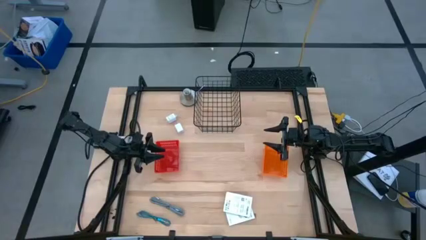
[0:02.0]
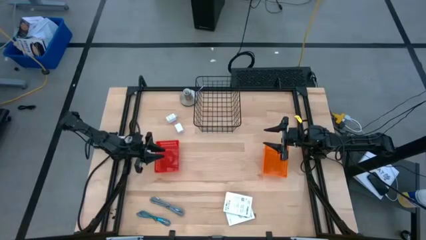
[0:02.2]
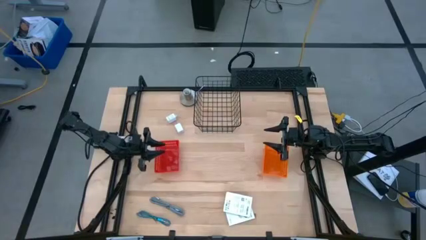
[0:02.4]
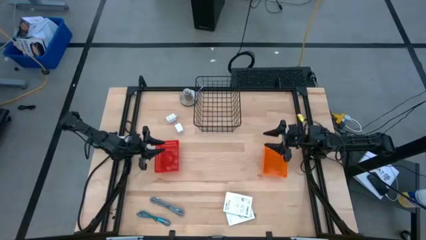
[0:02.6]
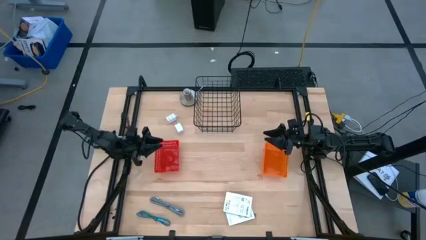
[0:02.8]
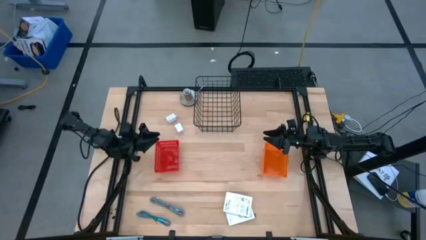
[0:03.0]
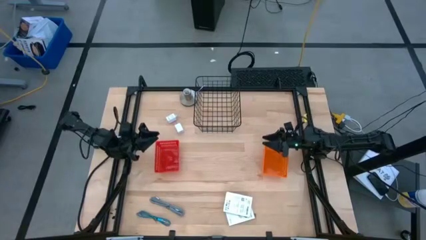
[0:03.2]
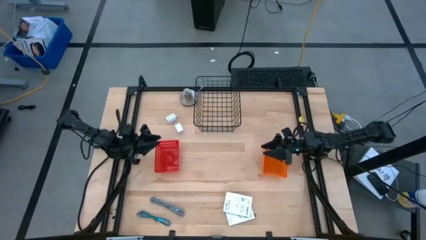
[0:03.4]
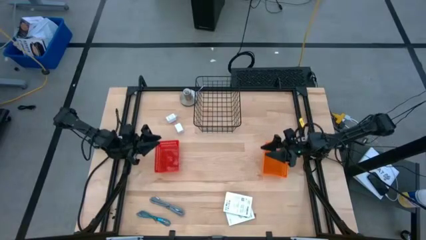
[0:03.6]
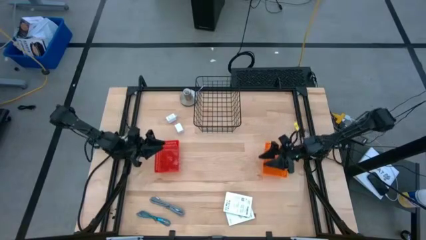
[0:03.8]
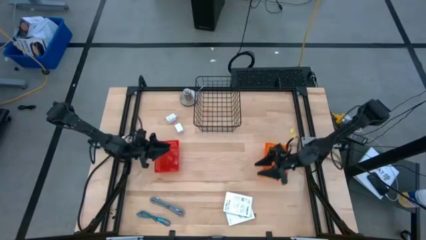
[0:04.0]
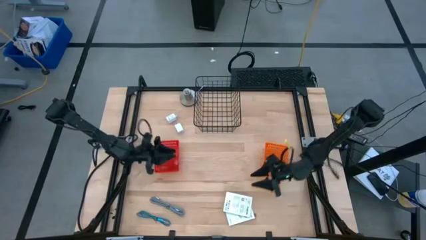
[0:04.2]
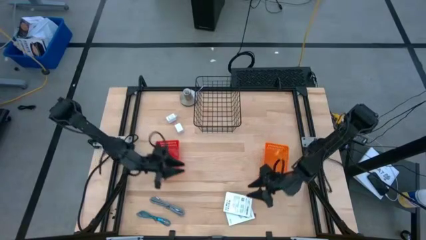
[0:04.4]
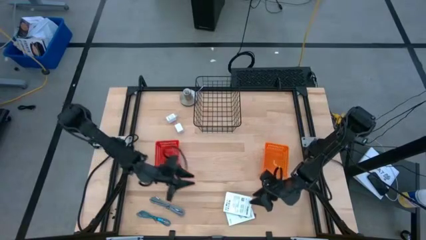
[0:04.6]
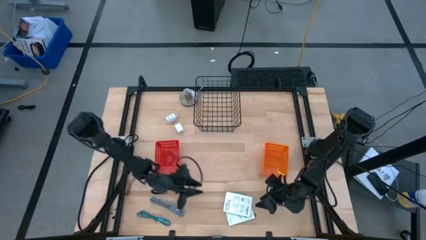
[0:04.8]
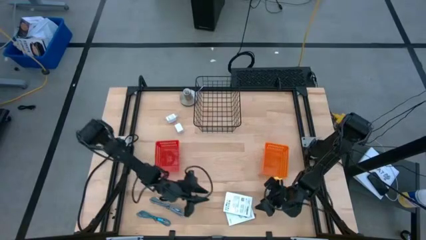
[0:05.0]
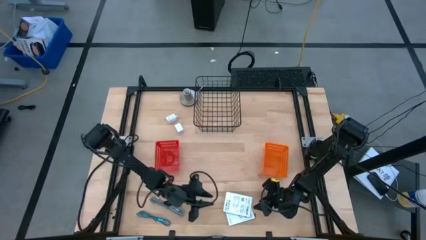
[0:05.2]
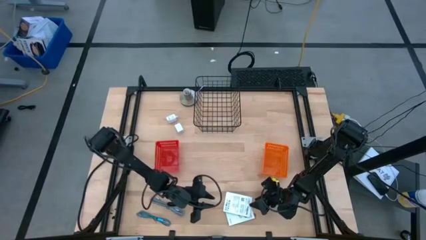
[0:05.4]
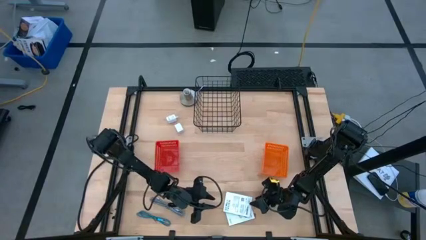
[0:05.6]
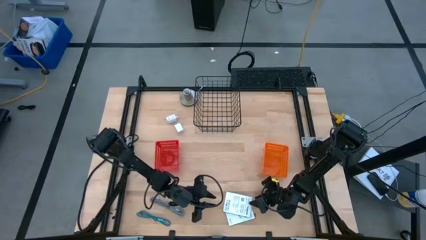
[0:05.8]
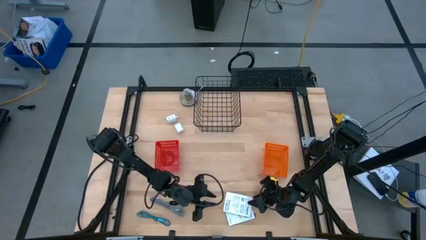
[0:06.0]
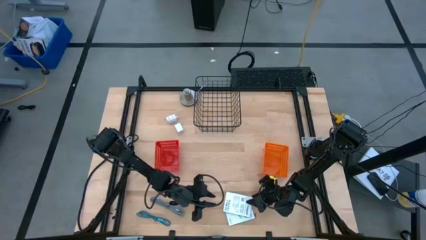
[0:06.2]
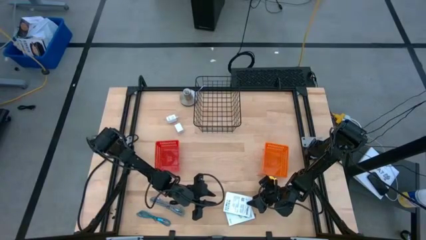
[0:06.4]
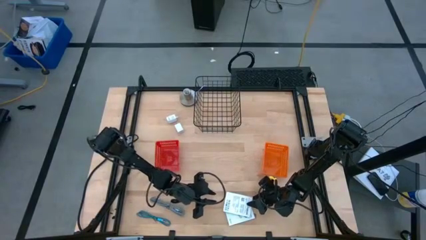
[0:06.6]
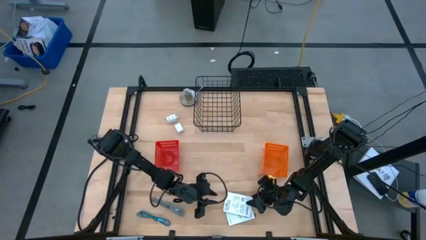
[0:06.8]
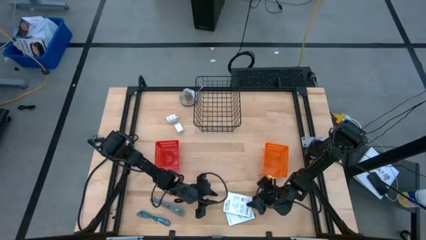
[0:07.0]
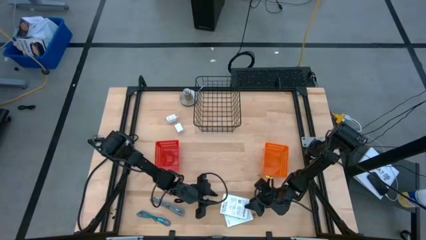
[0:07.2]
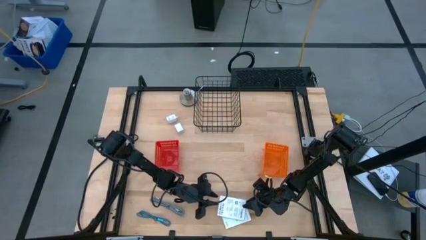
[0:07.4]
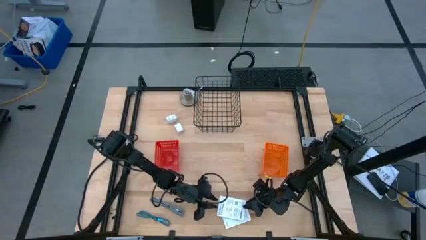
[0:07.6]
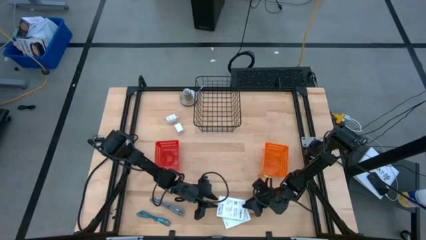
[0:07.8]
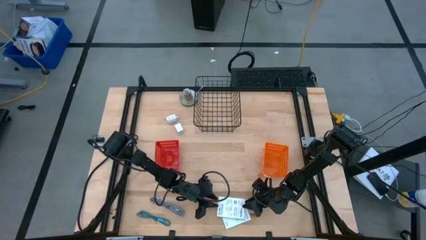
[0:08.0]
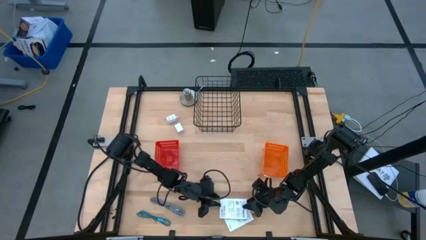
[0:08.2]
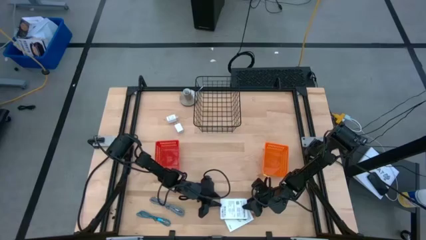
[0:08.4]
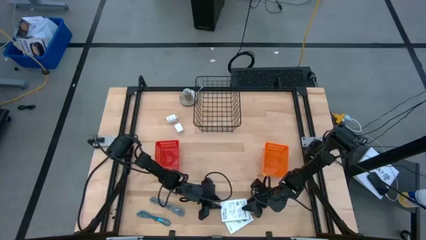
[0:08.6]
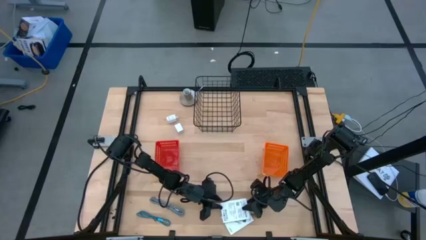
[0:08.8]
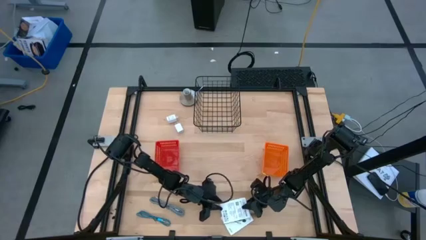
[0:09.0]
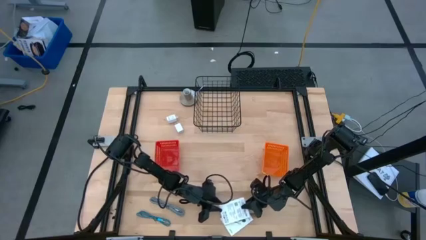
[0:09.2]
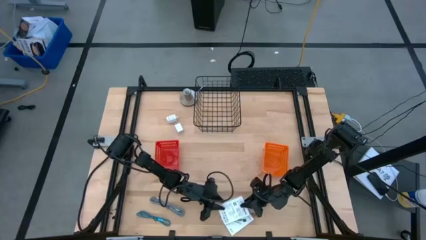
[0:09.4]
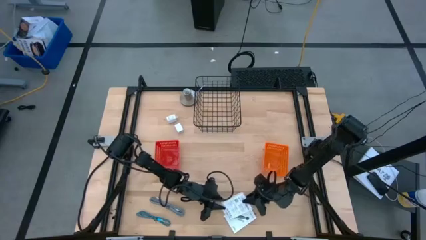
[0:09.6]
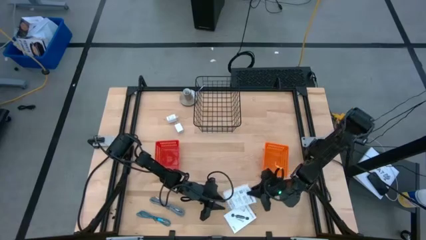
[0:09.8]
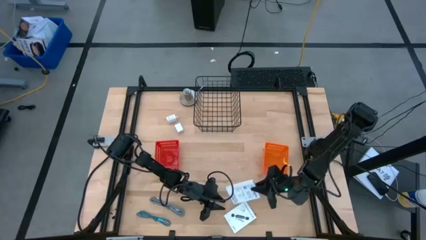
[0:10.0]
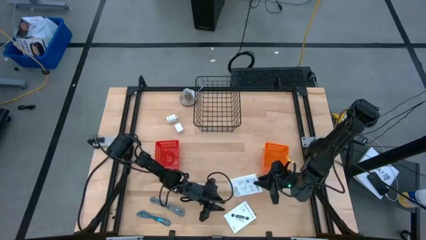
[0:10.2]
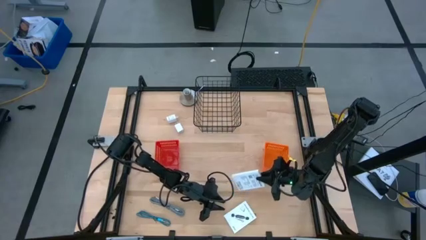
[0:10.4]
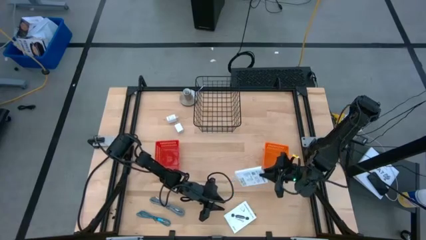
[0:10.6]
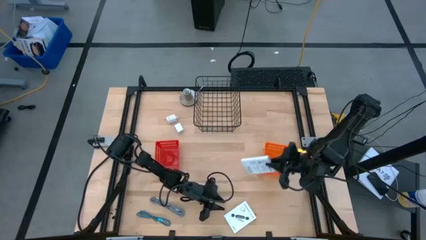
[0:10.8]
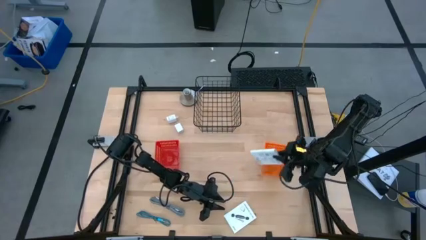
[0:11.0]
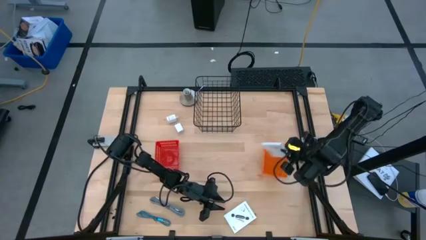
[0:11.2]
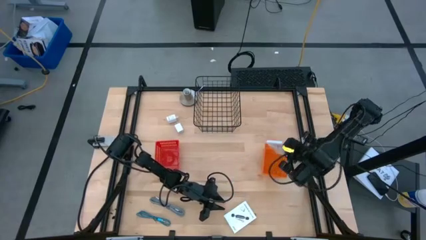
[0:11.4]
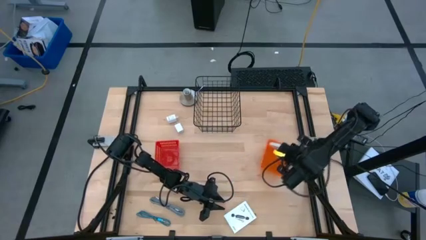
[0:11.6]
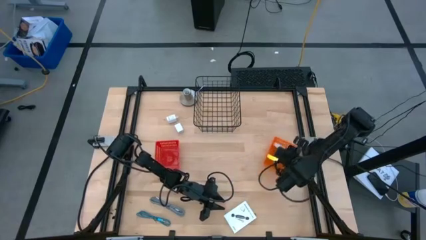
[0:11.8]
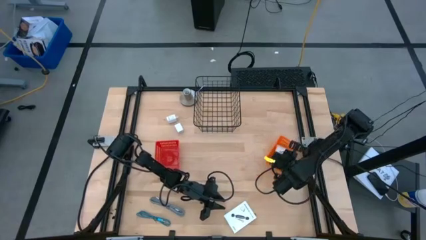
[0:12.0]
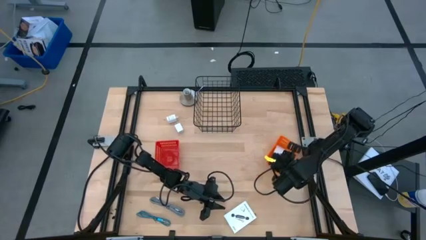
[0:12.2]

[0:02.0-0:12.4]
Task: Pick and place items into bin
Put the top card reader box into the orange bin

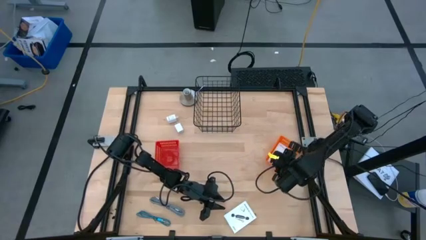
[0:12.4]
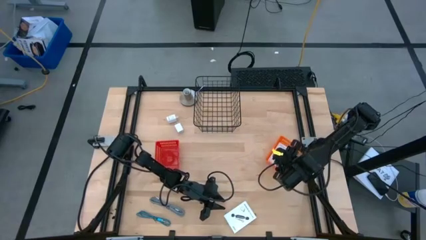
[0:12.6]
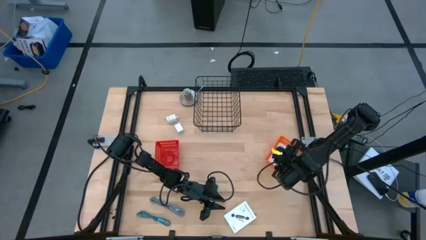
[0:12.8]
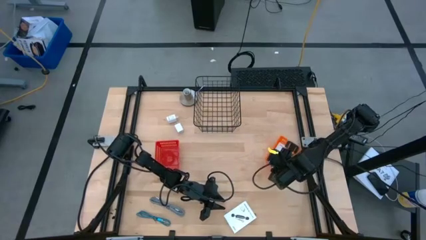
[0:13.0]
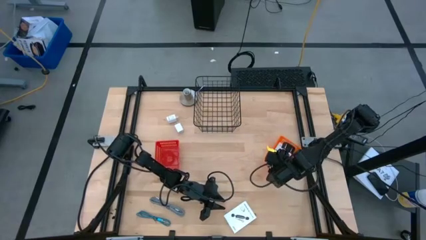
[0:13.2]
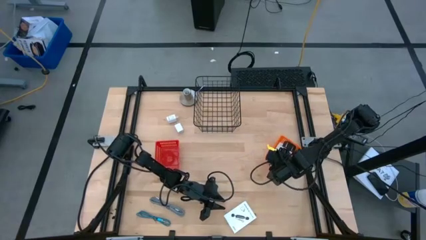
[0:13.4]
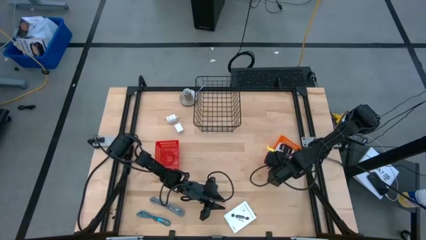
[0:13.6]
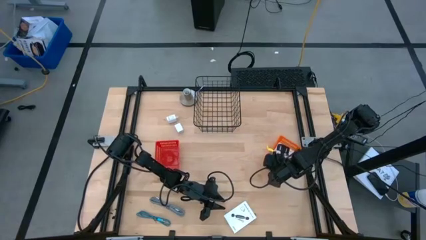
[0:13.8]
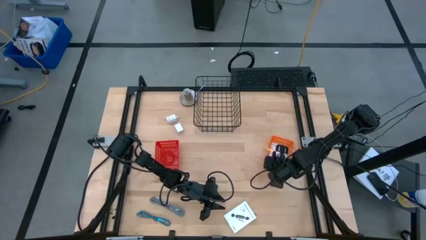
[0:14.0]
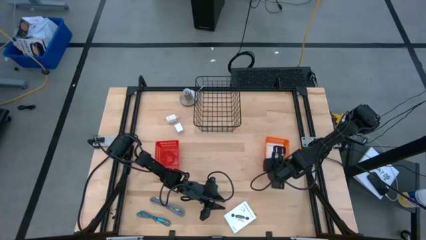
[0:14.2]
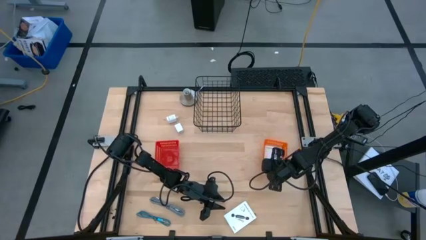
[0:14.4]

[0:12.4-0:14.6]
Adjust the orange bin

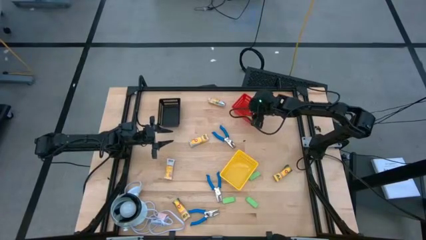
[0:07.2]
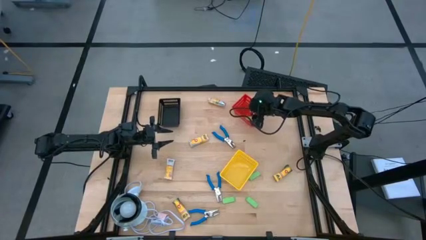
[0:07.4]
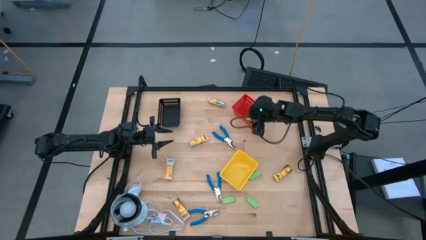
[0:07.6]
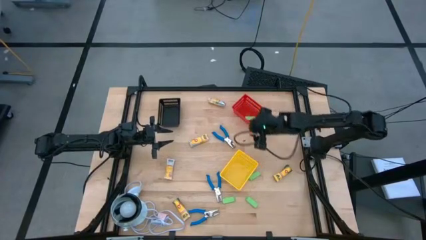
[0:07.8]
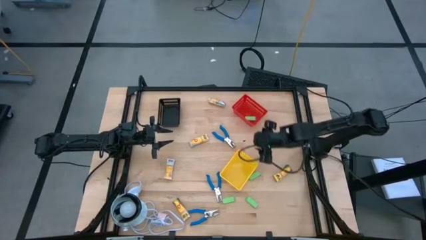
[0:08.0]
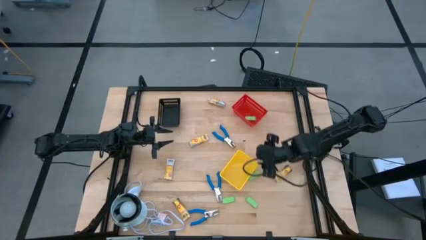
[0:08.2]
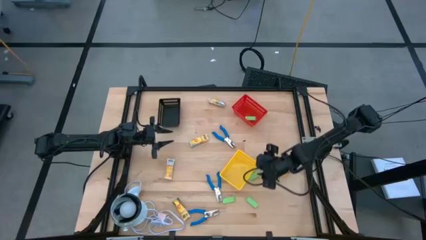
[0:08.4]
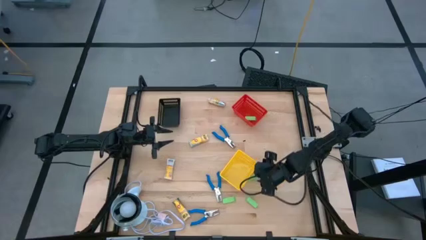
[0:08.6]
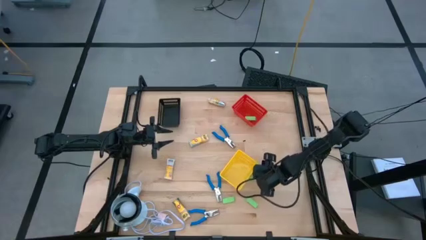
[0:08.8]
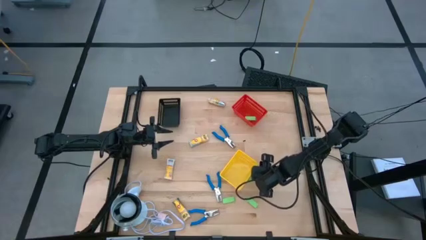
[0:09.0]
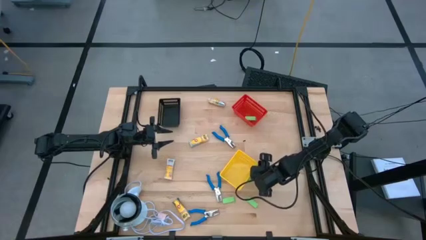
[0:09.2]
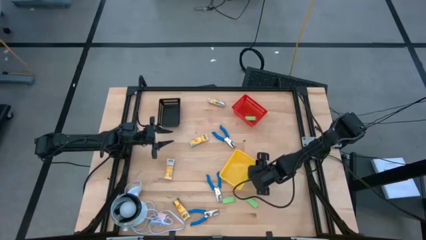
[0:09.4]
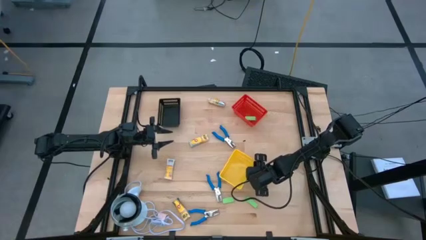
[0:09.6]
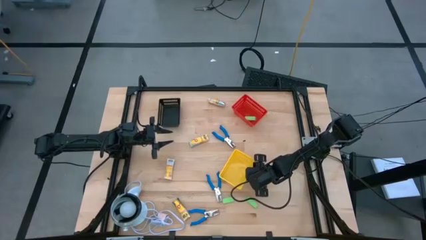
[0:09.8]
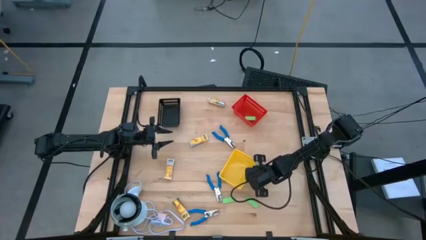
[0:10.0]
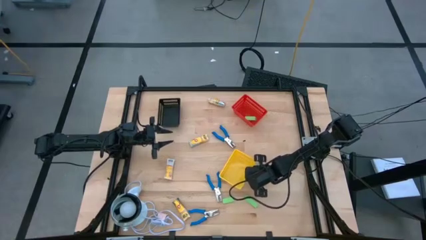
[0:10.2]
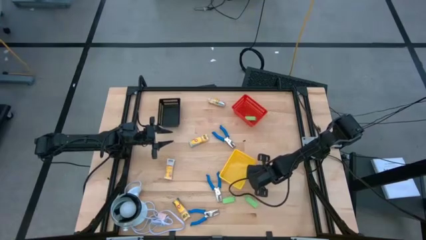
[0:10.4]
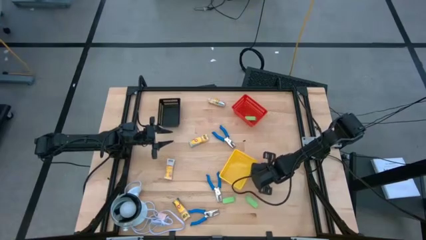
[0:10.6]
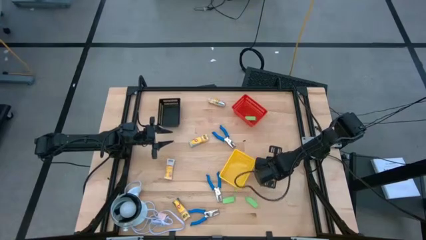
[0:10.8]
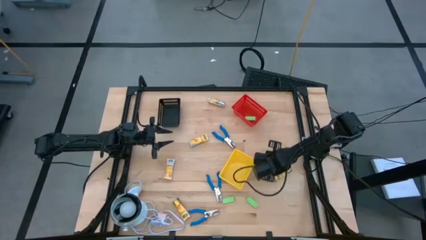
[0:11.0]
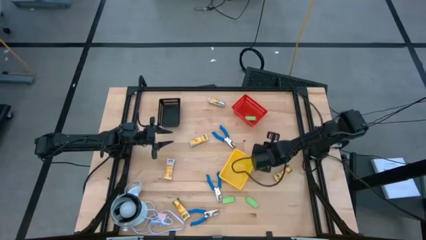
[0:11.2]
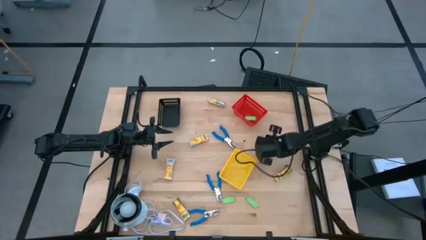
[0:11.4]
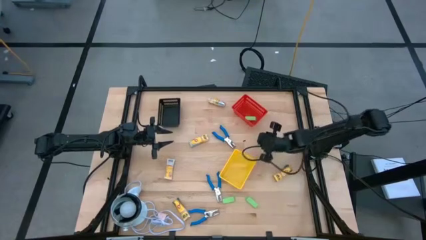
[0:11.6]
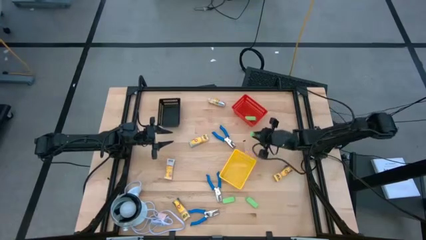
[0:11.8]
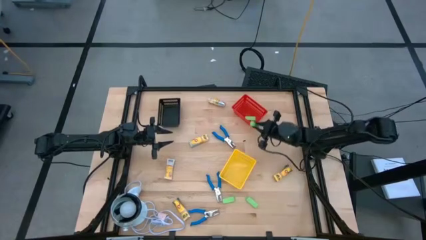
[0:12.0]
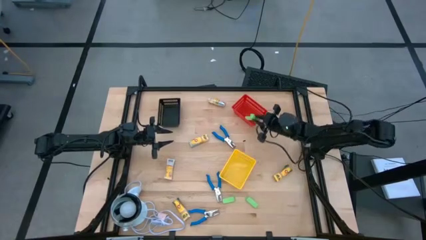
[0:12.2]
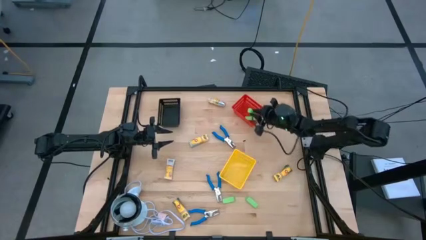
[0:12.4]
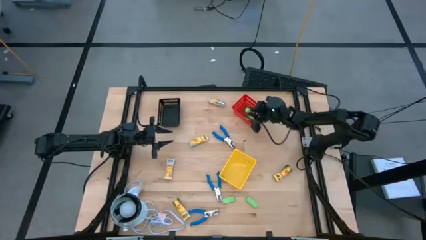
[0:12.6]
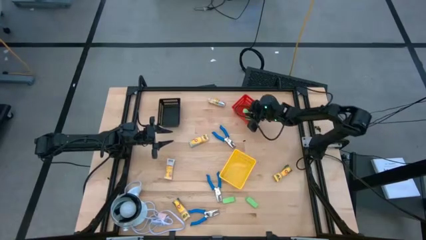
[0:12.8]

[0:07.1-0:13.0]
Task: Pick & Place School Supplies
Put the green eraser into the red bin
